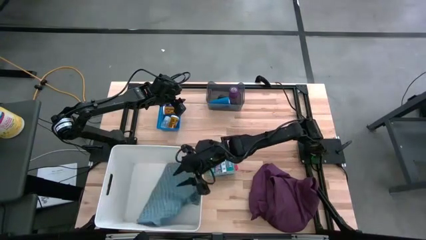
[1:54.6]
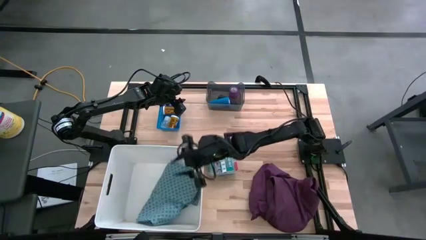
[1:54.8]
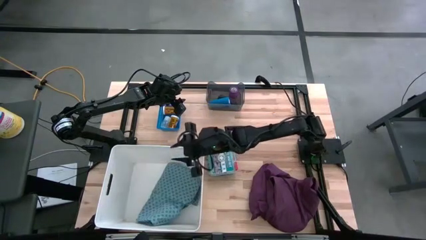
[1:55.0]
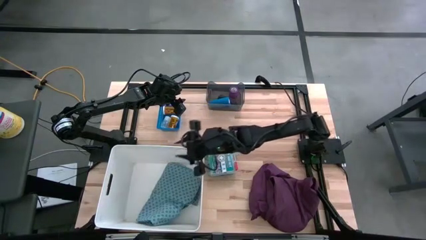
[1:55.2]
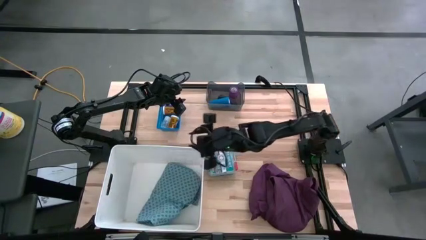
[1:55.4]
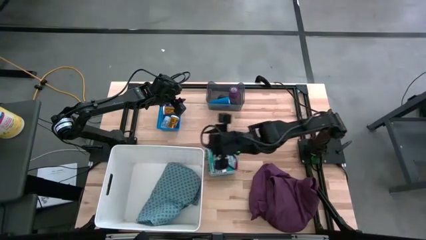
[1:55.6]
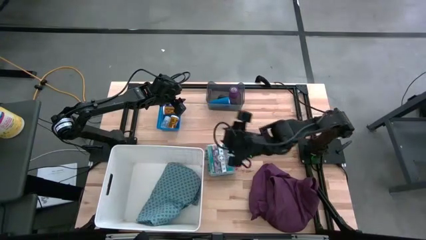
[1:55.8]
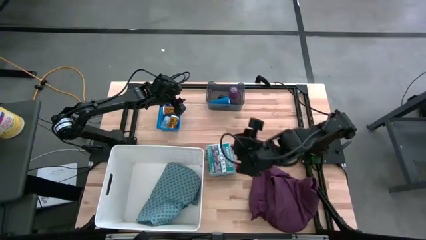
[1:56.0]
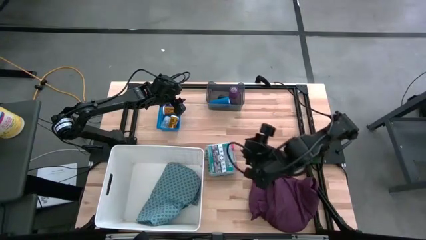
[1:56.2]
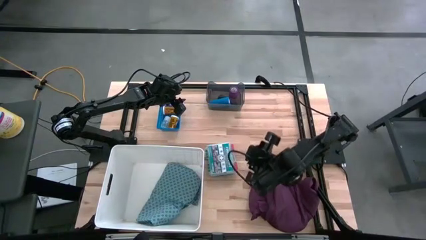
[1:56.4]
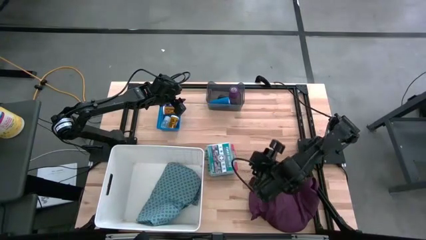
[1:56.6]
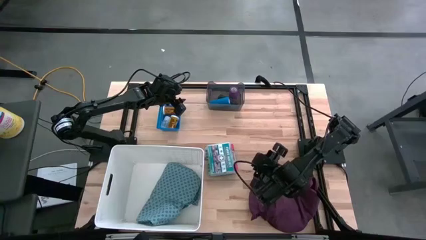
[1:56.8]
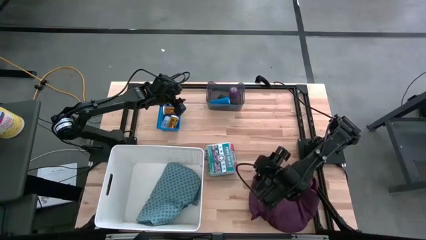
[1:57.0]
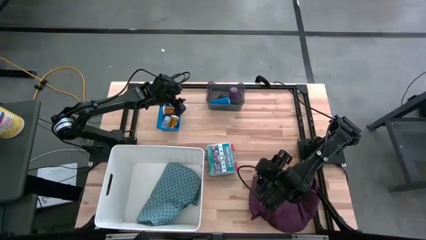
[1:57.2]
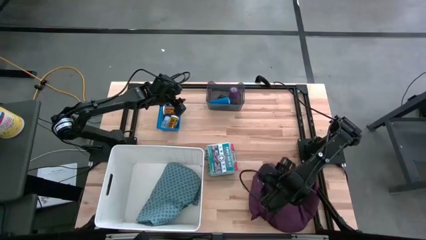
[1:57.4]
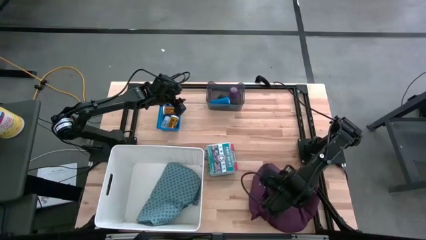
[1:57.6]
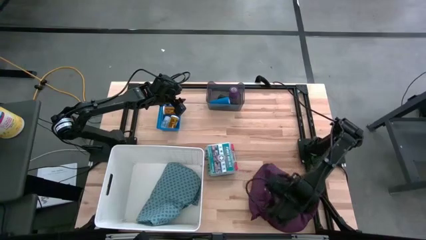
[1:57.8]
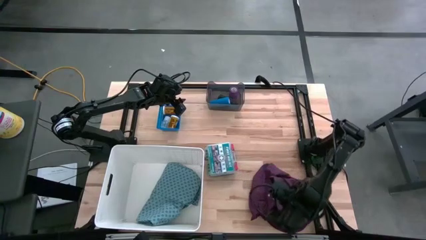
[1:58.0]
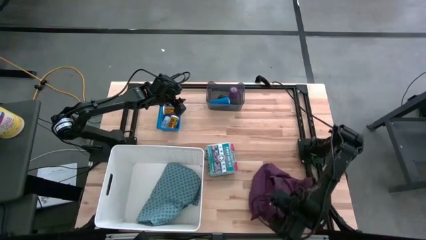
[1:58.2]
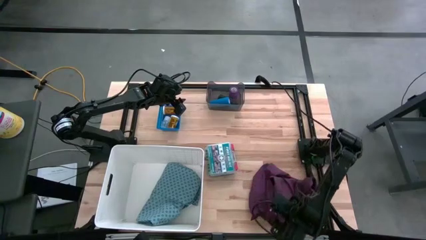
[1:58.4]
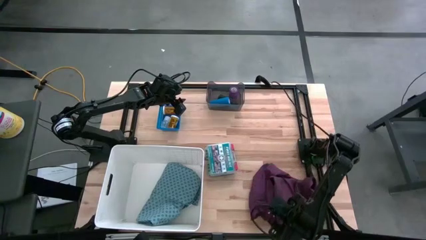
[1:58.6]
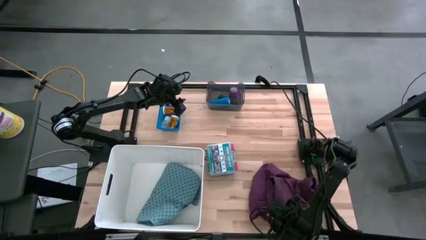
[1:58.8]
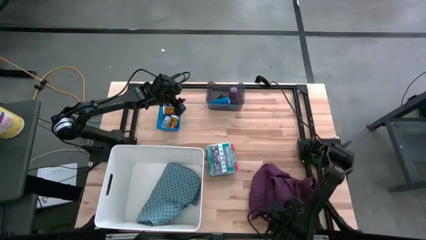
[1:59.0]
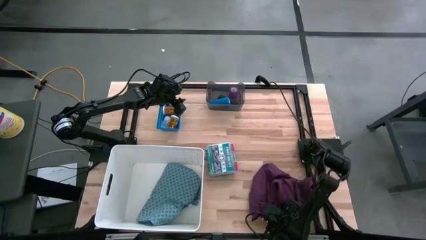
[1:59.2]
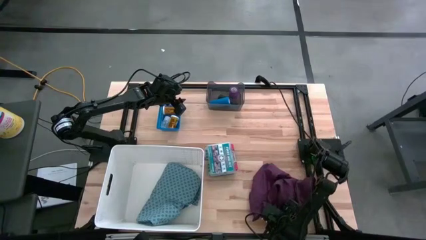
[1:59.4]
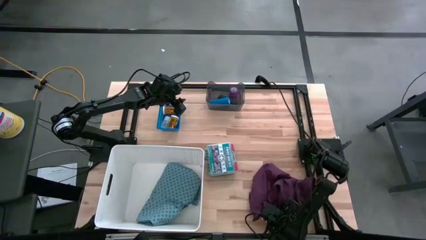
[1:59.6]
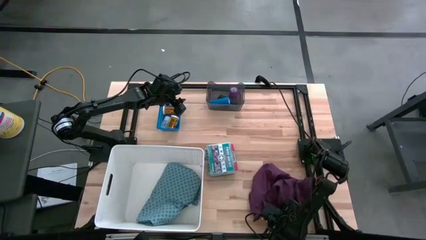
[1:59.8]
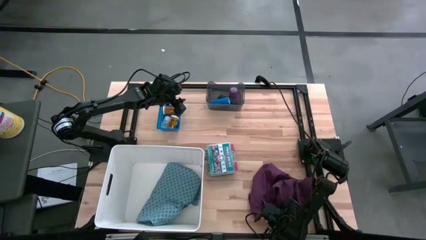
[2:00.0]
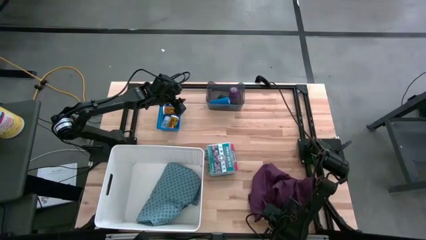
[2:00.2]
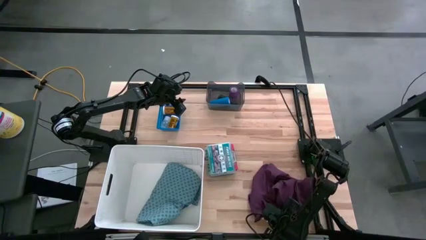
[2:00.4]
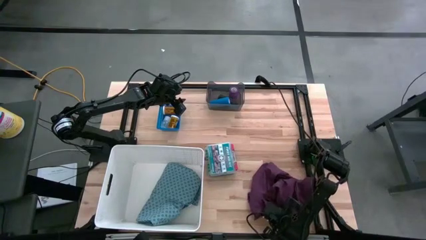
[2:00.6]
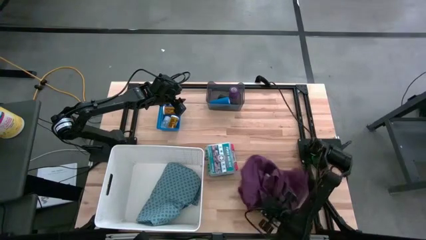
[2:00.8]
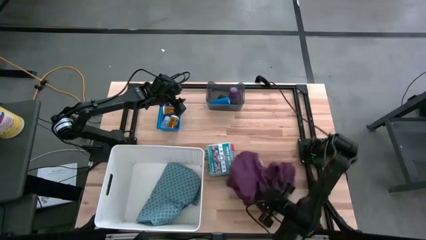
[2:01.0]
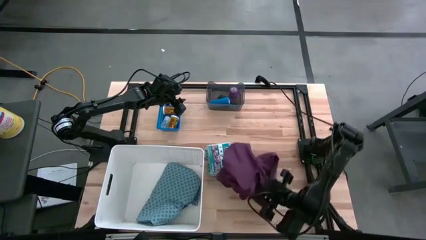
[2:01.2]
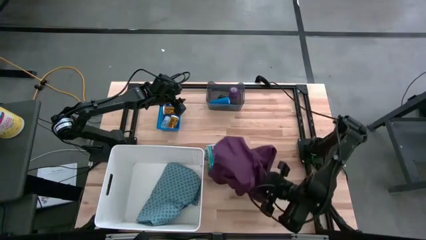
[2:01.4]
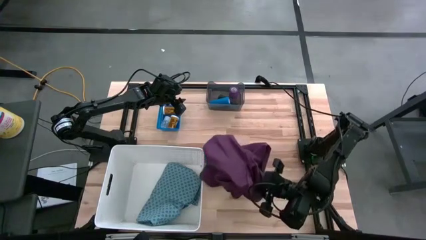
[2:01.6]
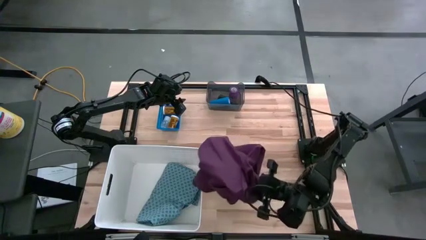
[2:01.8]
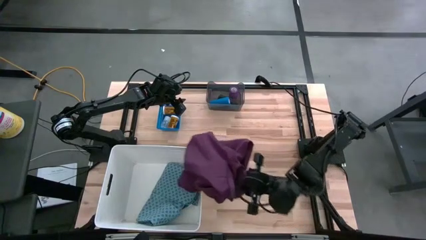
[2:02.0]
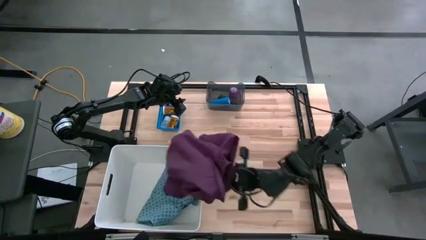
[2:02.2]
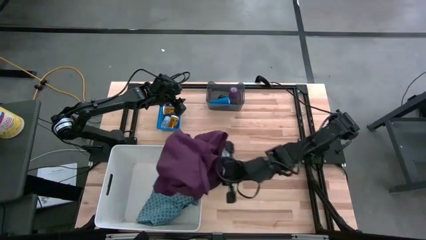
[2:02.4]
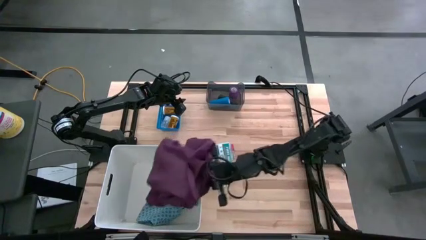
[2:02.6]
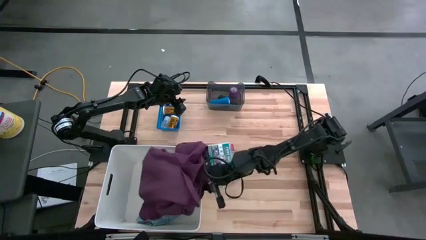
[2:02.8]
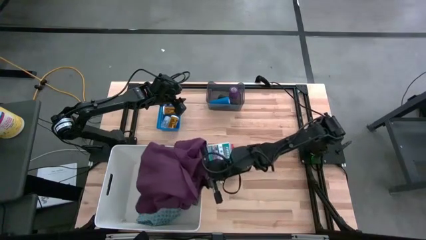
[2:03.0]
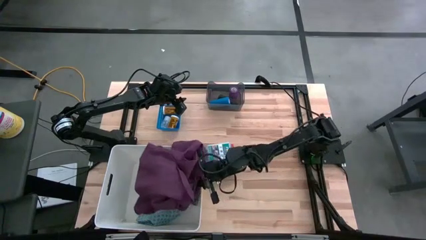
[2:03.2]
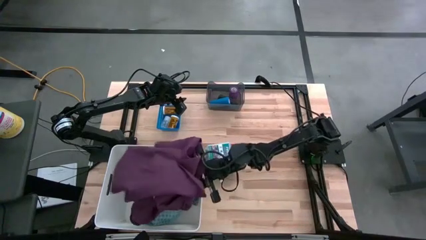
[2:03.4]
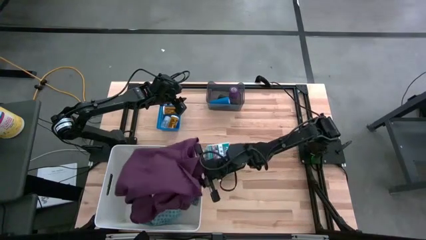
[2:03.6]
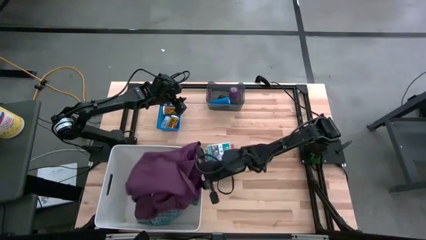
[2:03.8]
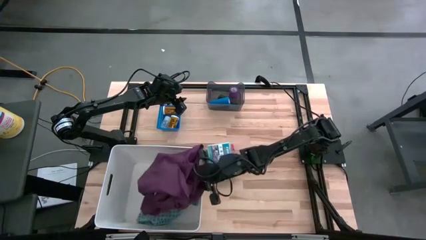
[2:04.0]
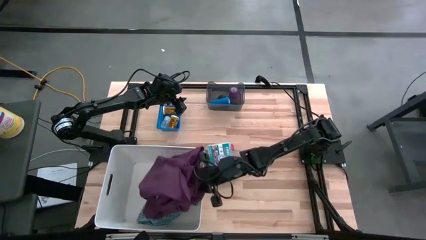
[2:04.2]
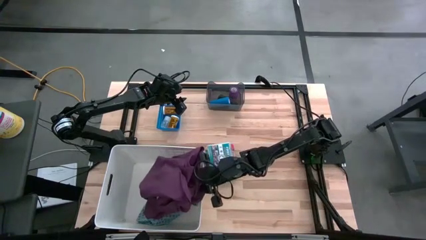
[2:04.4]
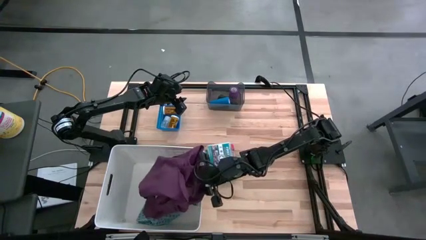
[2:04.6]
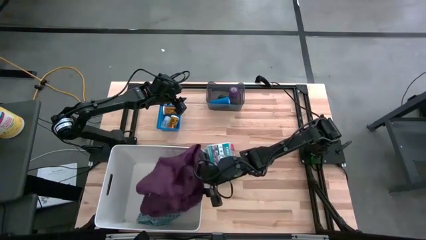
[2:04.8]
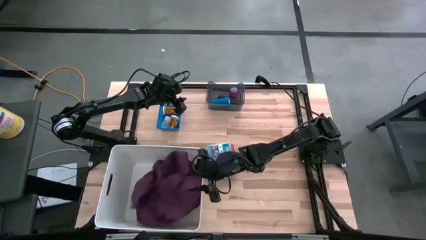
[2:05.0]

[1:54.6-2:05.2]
Task: Pick & place medical supplies in basket/bin
Put the purple patient gown into the white laundry organizer

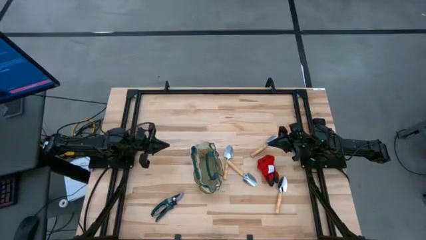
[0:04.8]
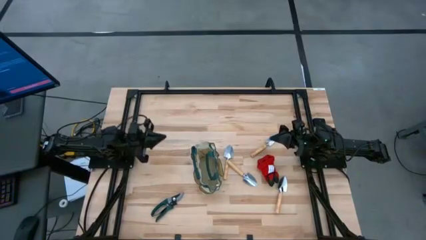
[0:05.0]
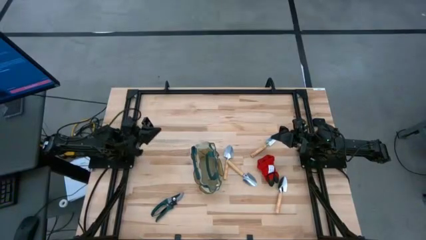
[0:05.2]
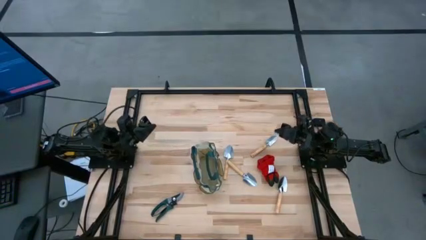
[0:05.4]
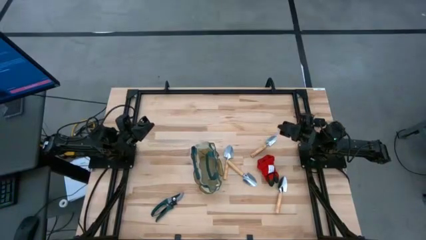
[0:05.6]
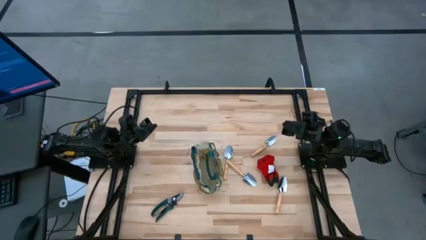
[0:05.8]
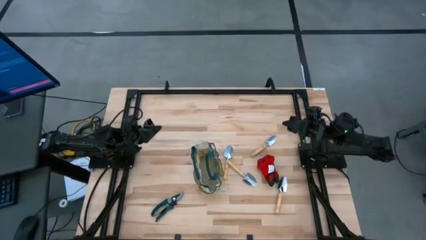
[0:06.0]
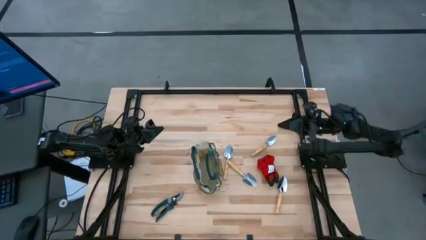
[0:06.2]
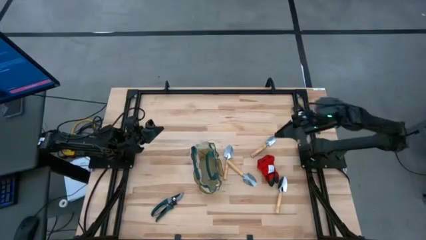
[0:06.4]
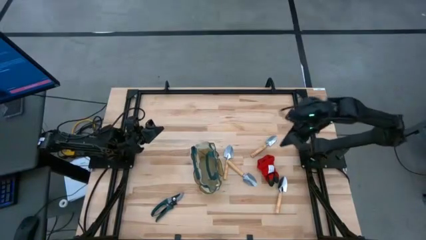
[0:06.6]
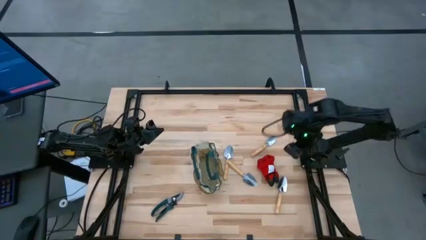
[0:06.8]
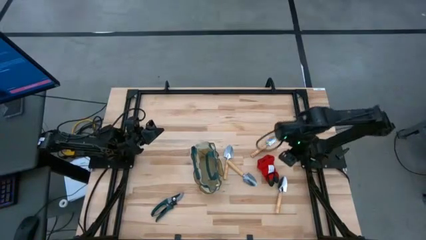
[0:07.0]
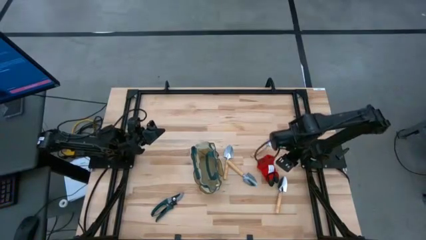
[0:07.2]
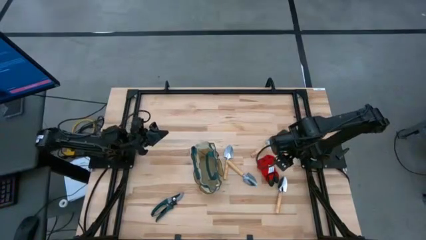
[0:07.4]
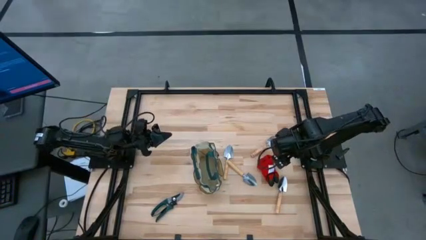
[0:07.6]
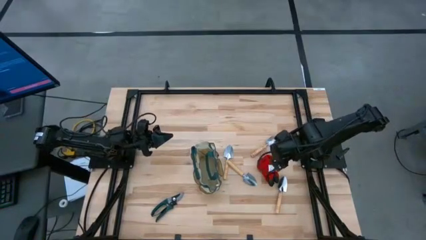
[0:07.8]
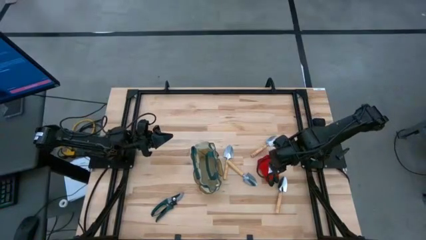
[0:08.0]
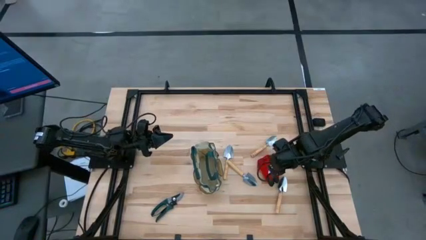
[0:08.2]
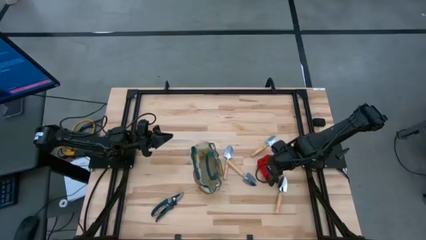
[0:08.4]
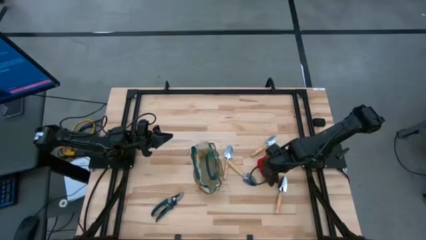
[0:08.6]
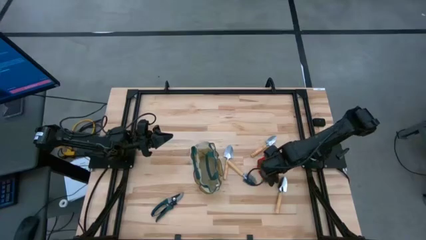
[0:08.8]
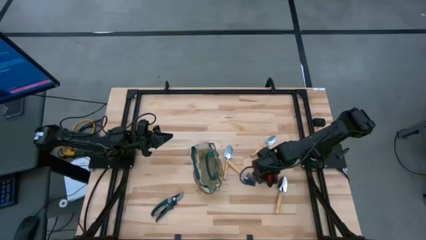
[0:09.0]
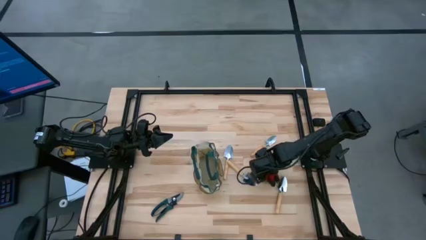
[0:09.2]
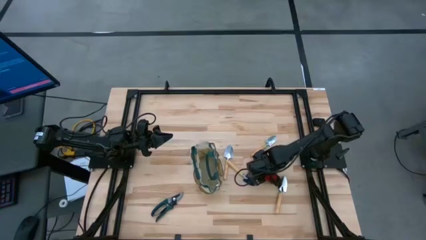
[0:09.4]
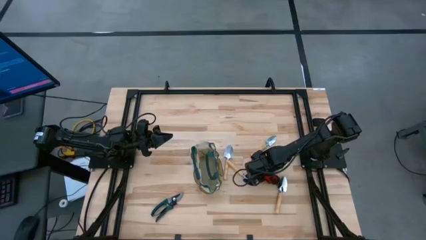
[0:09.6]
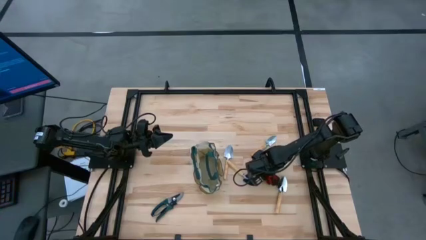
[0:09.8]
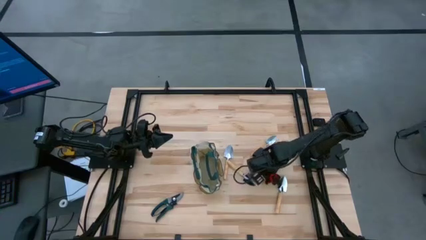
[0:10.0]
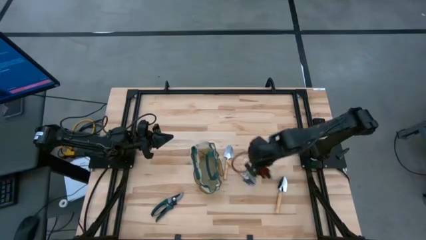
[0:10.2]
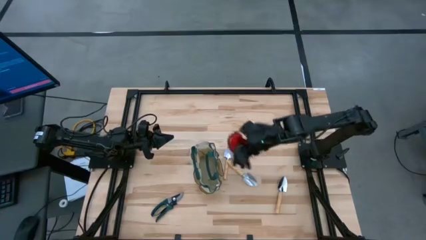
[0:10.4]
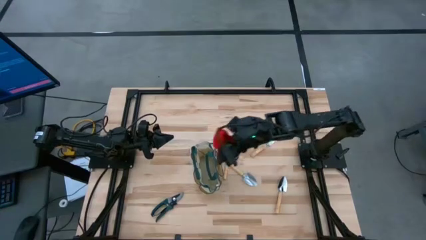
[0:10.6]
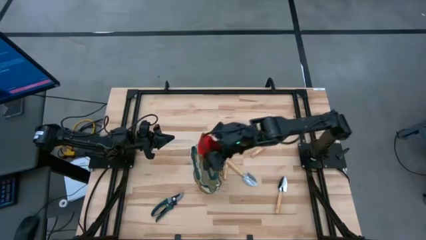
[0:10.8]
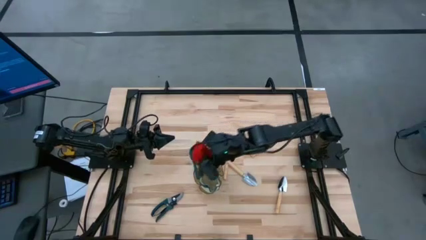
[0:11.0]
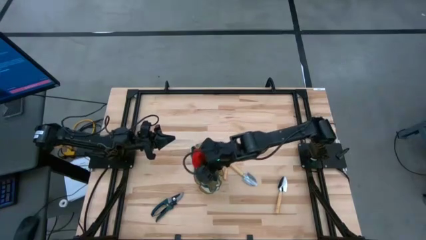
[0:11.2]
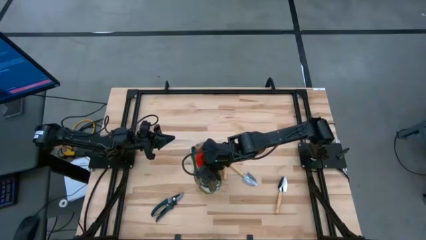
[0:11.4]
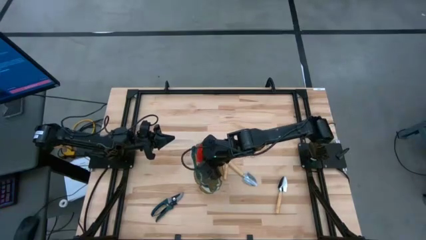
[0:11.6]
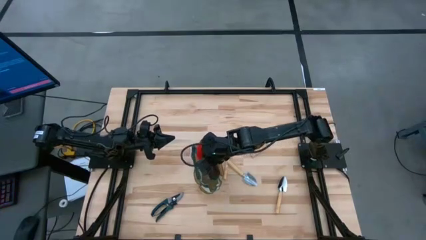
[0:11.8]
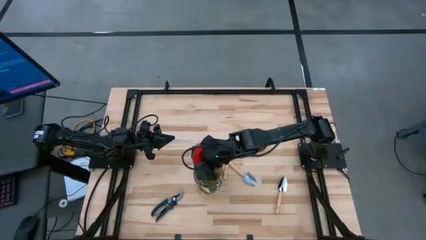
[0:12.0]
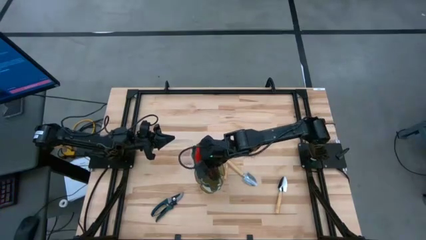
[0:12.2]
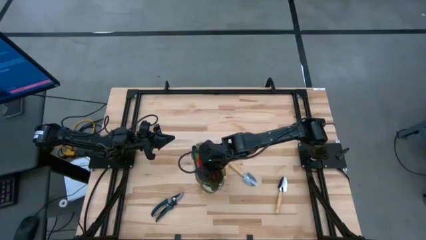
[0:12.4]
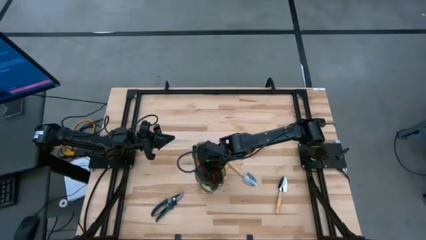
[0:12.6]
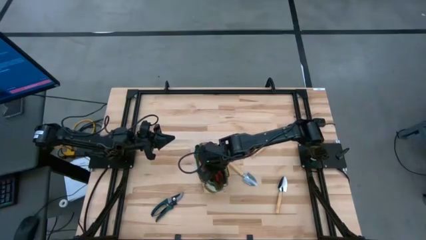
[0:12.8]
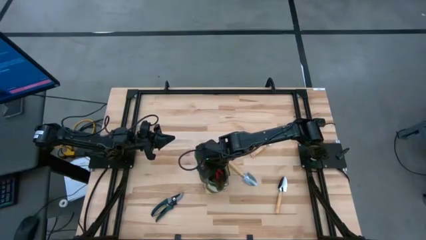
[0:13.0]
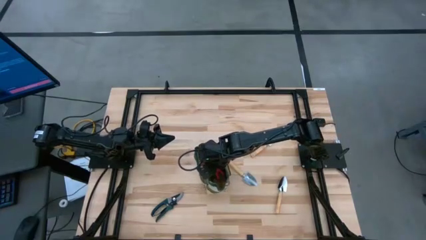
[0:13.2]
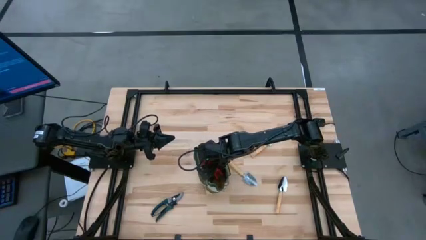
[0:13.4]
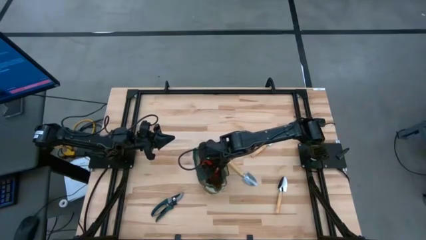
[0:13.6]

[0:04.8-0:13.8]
Task: Pick & Place Garden tools in Gardening bag
Put the red gloves into the gardening bag
